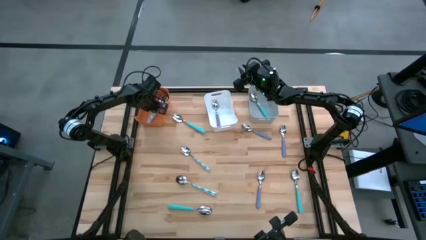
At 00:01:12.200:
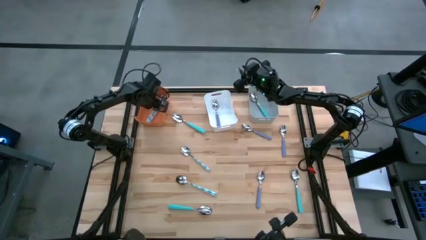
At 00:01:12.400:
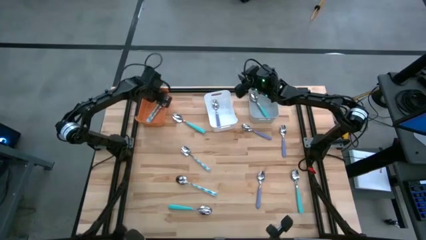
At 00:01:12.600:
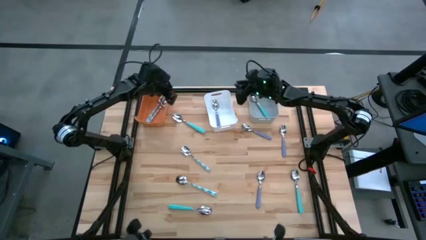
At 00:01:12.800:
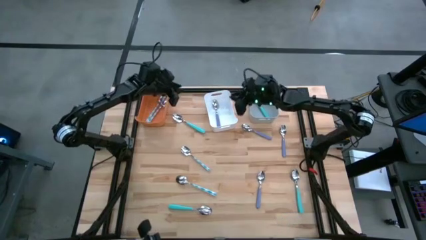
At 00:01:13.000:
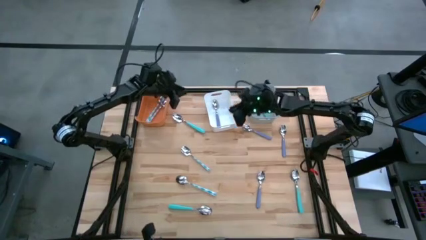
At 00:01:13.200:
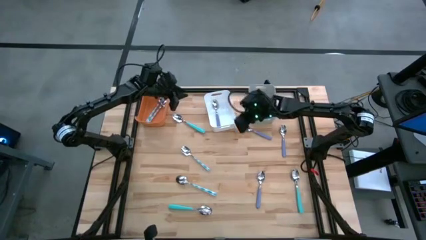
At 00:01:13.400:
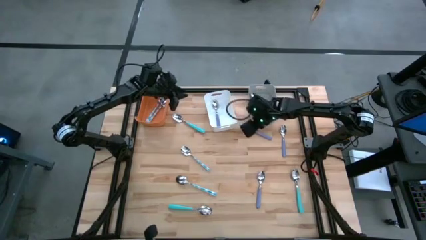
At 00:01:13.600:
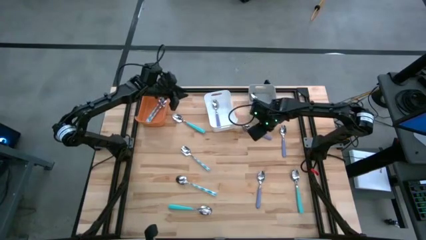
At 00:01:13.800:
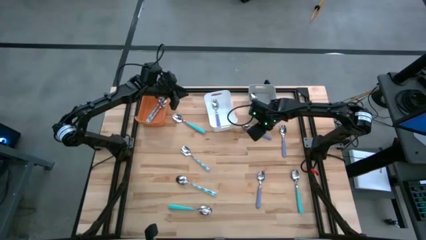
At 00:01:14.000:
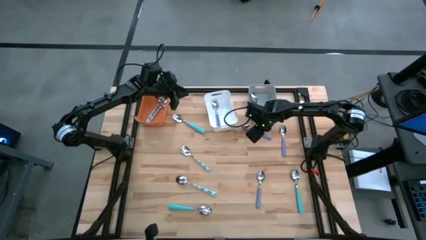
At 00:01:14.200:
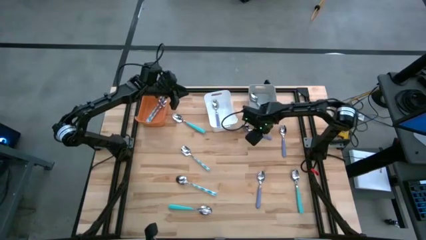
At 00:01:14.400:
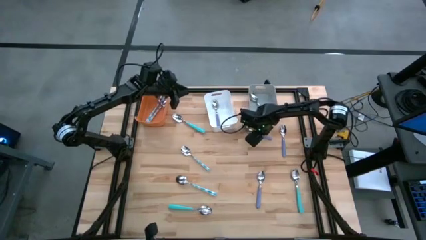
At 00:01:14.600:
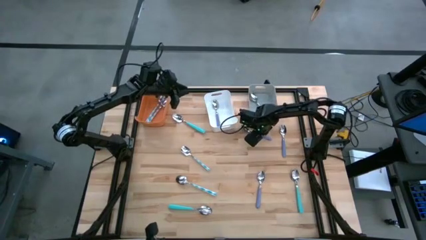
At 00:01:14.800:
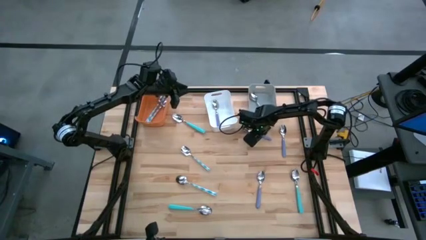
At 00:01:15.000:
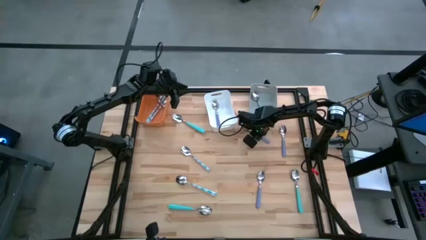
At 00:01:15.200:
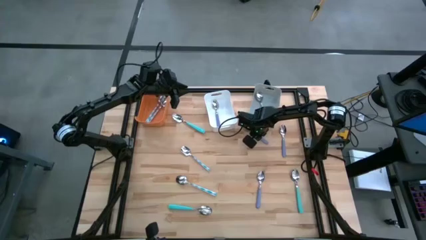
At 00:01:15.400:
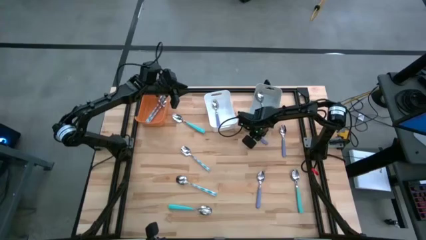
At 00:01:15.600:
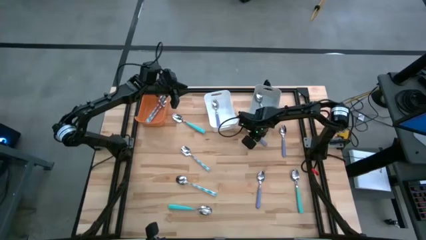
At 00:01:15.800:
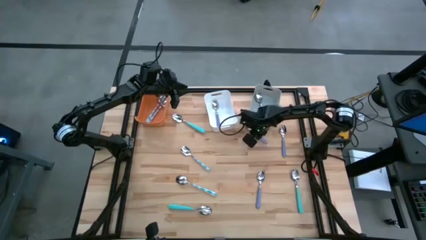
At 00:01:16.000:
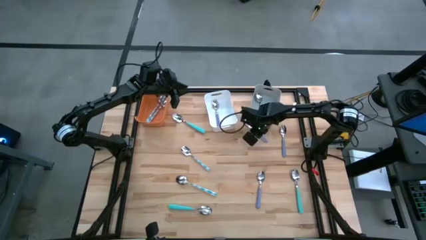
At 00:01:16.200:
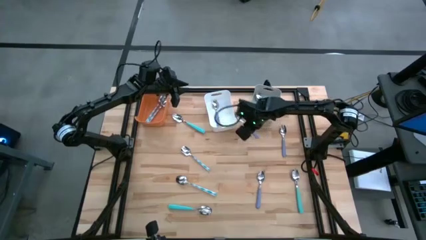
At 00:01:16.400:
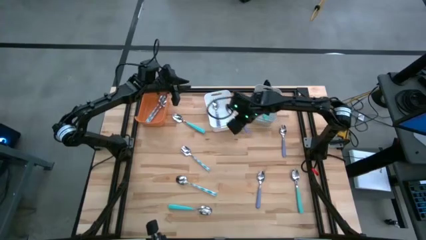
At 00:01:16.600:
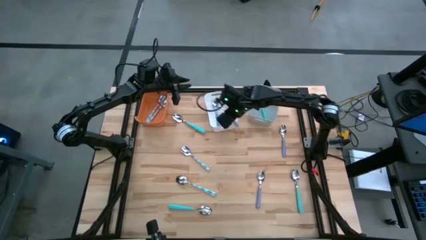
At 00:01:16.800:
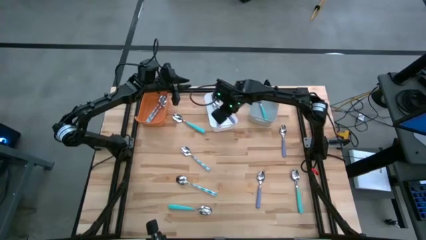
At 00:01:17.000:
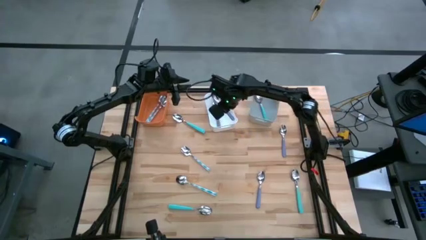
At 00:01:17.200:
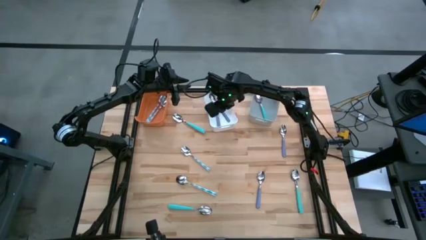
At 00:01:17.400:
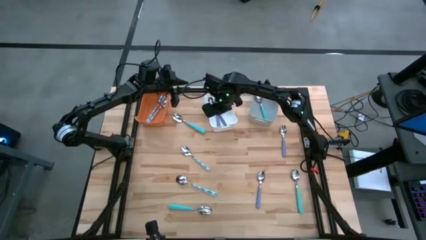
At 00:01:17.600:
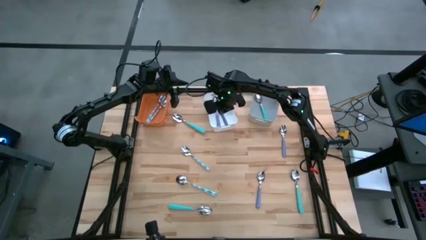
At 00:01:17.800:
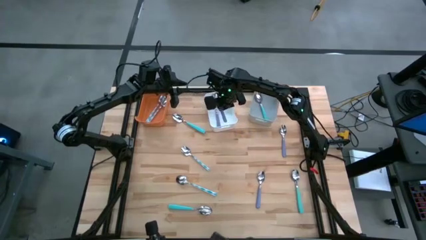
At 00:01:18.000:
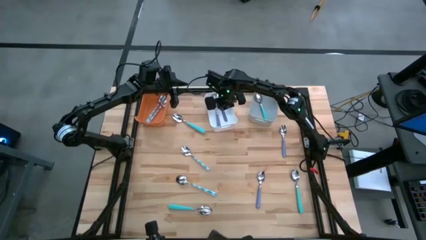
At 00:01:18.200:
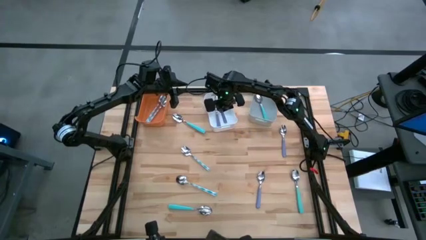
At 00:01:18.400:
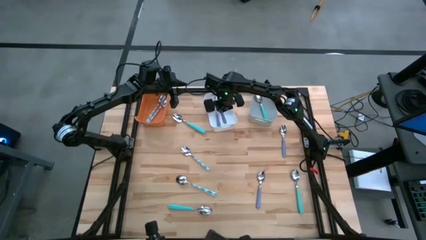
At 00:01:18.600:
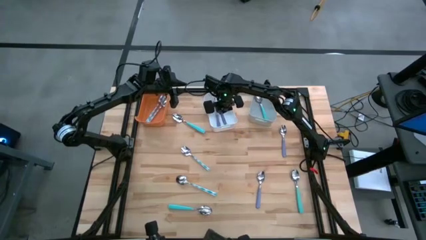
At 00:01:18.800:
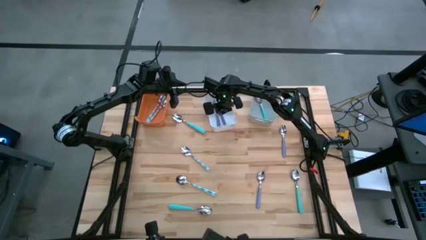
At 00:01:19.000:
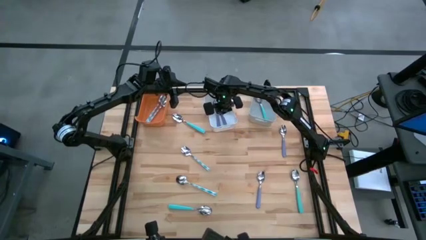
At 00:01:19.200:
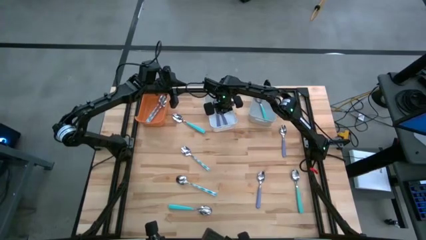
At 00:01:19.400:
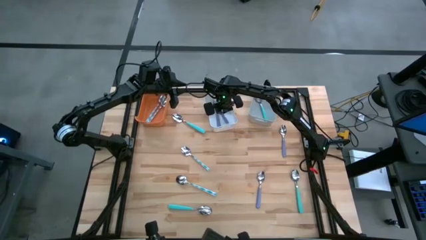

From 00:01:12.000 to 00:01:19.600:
Task: Sort silverware by color (type)
Put the purple spoon into the white bin

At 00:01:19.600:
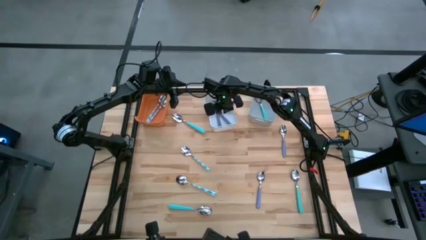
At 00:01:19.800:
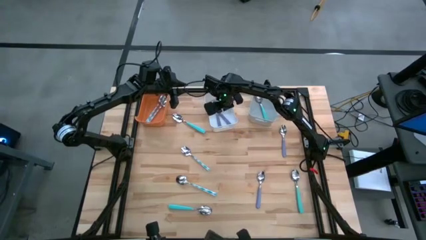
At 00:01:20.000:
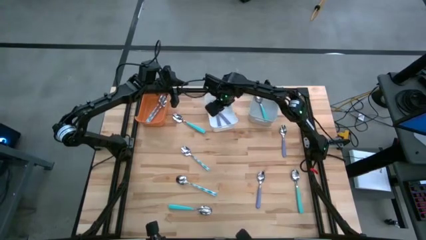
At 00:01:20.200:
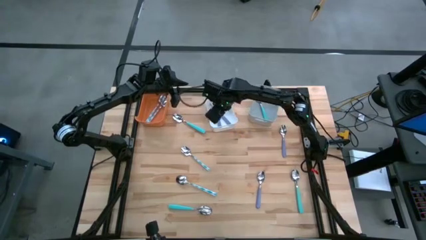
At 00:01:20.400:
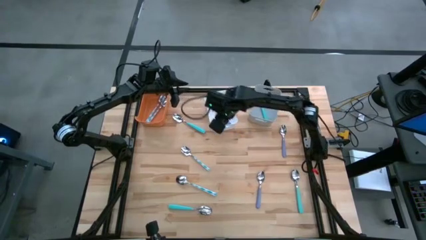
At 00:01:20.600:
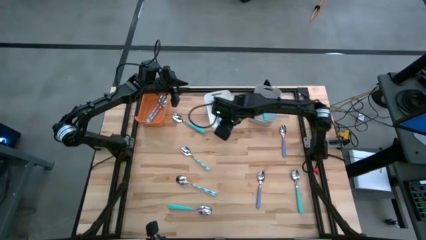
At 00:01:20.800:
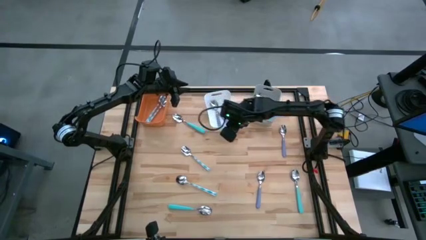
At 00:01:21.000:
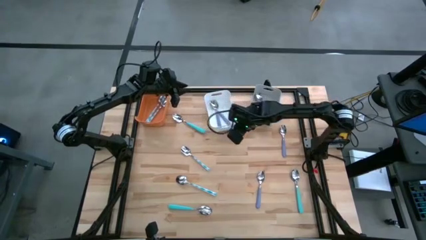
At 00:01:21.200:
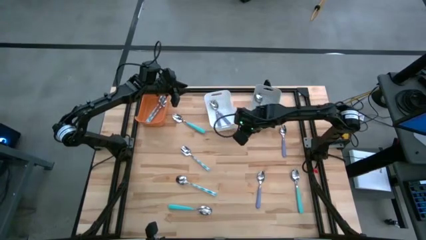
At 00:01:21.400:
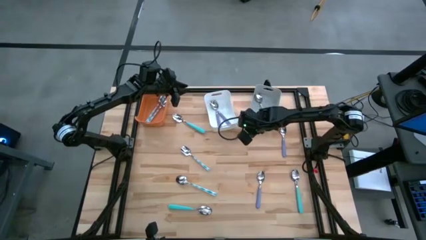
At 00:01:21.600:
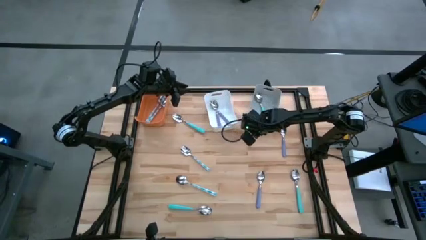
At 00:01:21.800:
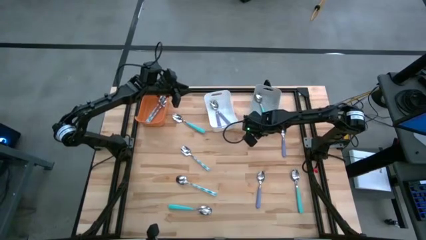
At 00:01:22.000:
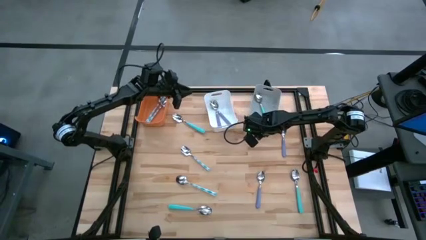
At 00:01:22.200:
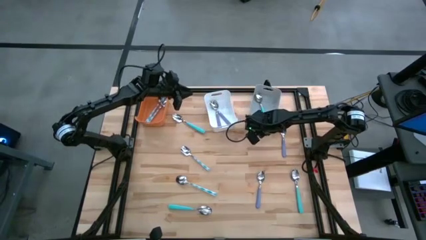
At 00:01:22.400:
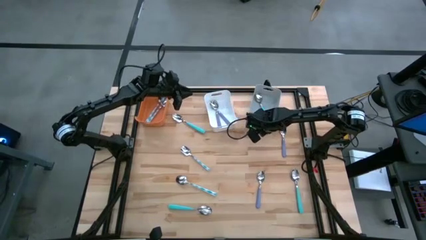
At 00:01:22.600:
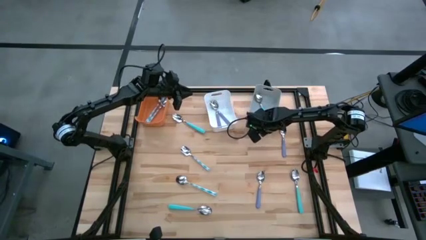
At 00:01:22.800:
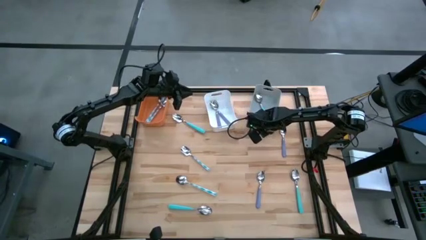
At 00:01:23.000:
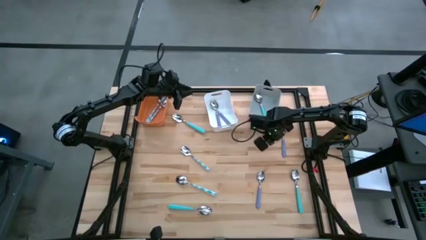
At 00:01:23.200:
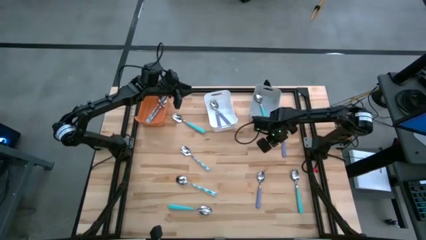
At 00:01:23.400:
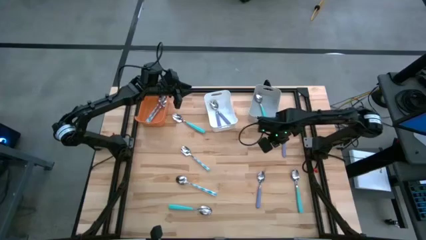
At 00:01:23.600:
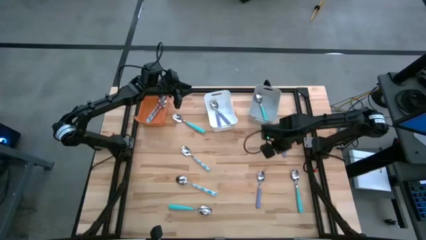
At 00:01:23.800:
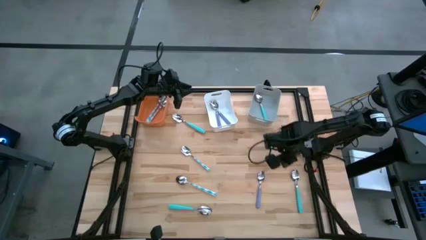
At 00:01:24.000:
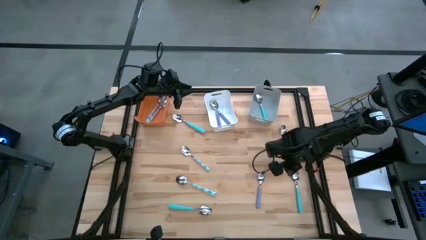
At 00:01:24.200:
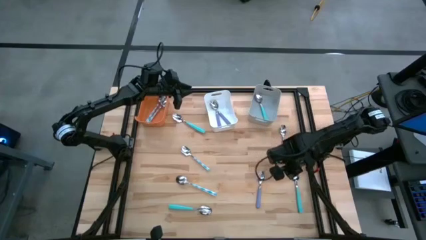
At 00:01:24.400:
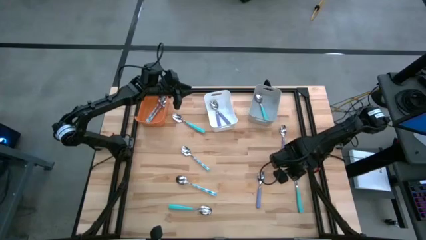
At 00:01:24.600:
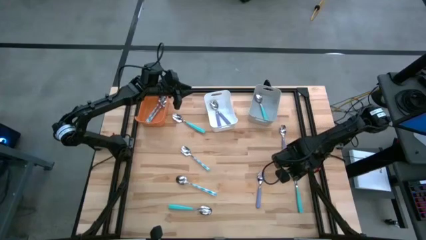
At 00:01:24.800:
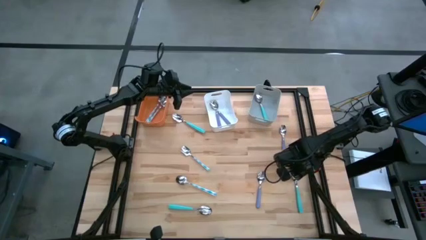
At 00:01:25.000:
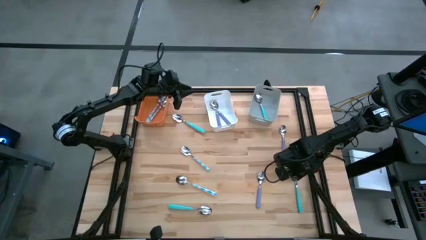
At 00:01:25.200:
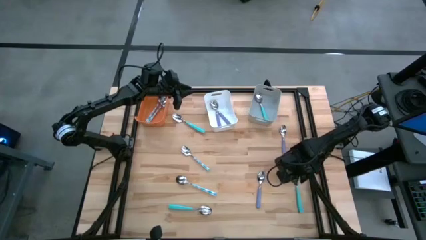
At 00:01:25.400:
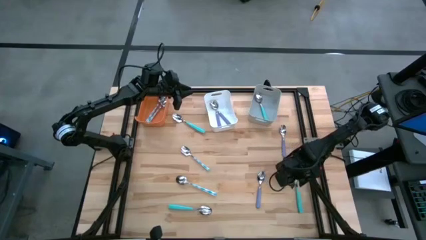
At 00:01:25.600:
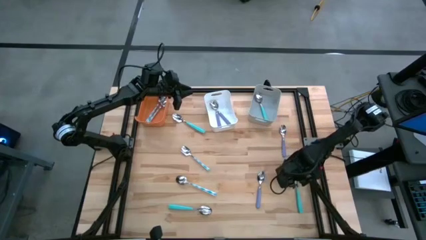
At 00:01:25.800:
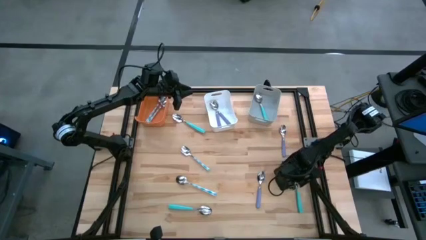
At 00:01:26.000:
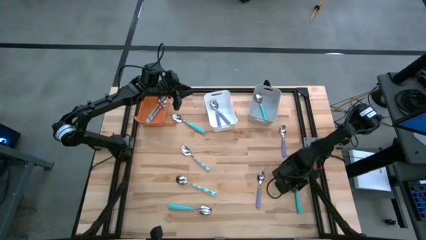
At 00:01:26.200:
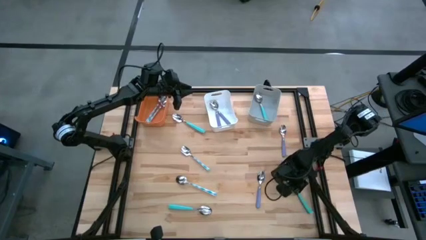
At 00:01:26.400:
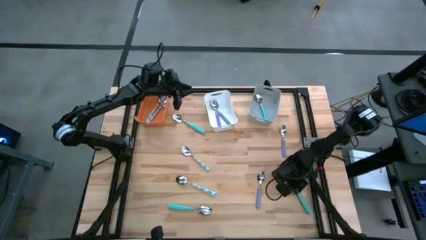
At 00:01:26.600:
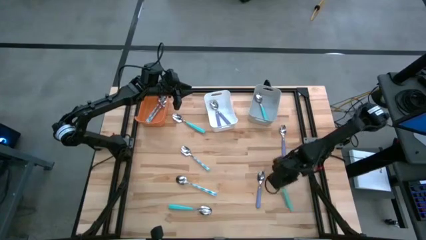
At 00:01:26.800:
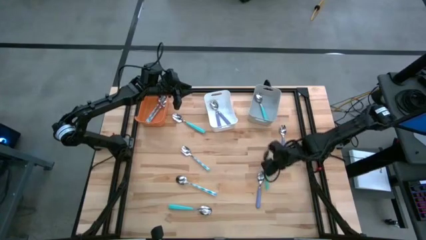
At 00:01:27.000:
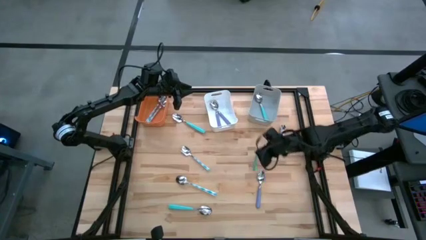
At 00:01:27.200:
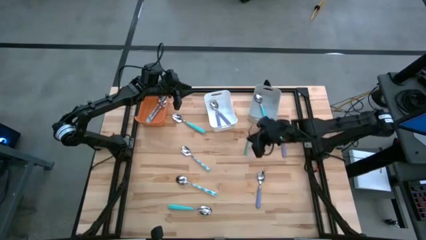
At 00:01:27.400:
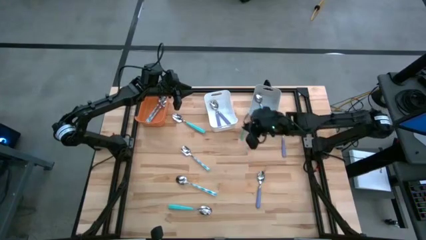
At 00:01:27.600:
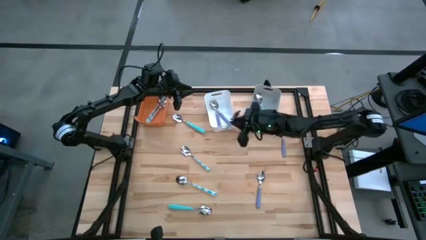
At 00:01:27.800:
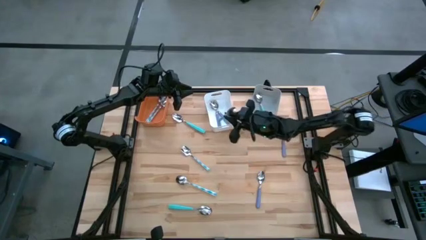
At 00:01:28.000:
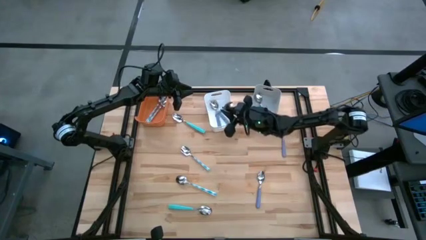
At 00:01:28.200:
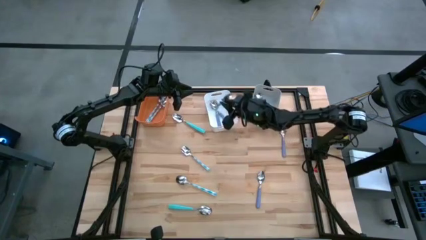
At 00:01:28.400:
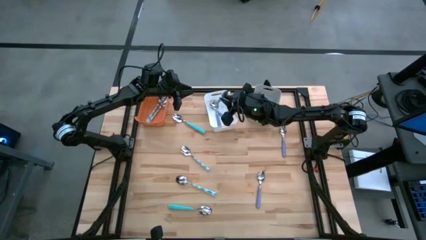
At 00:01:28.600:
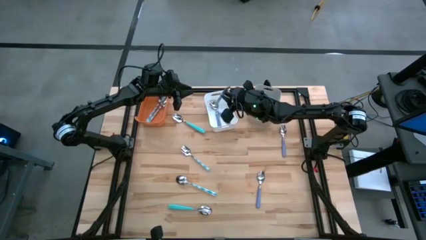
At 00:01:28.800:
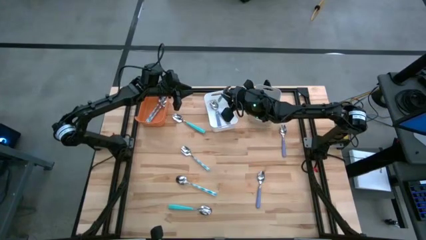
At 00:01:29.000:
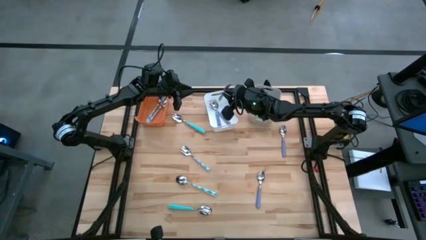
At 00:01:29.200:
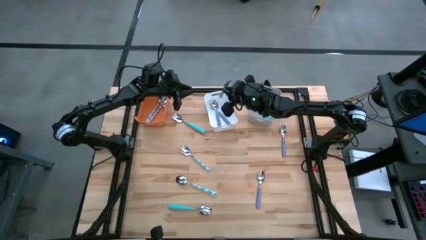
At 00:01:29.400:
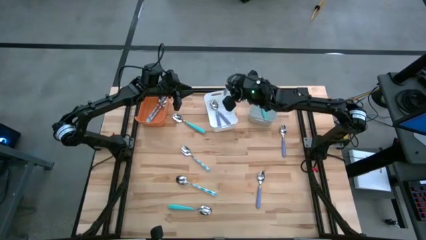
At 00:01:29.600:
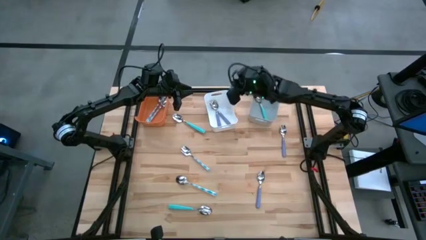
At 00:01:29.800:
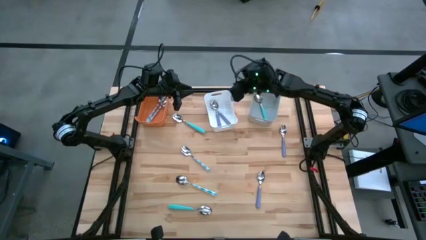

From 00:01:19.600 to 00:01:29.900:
Put the blue spoon into the gray bin
